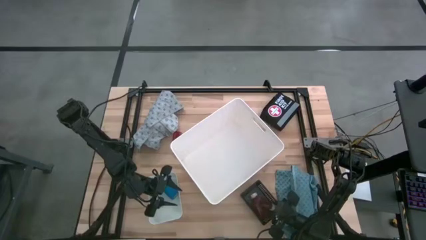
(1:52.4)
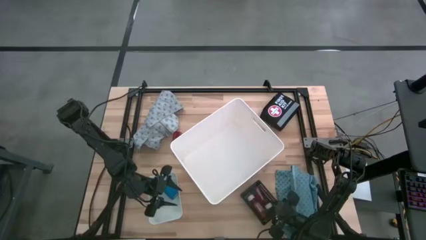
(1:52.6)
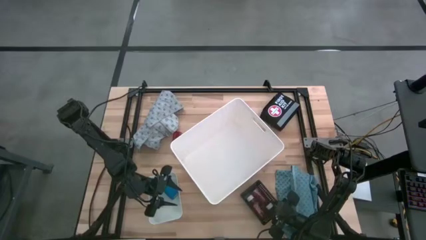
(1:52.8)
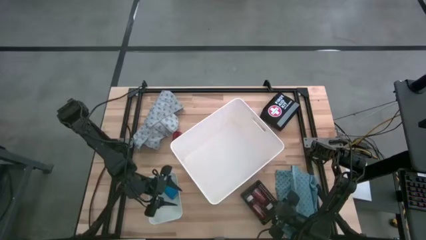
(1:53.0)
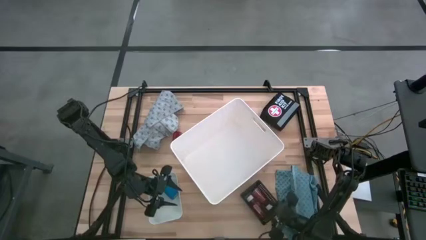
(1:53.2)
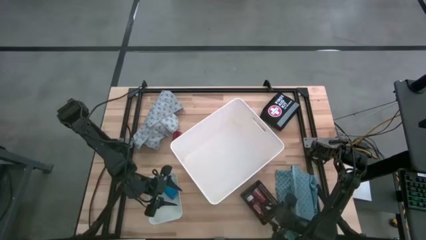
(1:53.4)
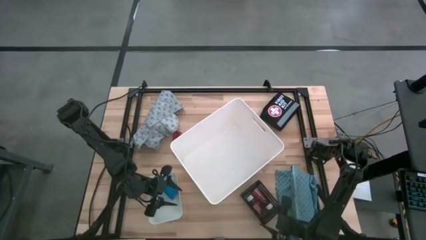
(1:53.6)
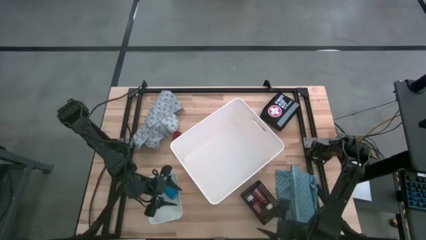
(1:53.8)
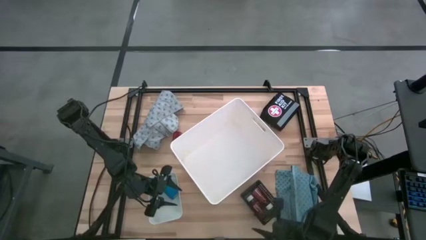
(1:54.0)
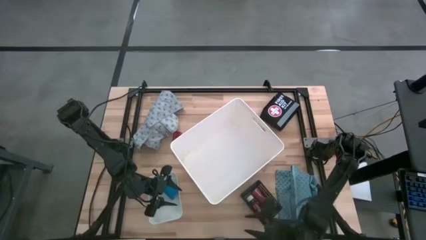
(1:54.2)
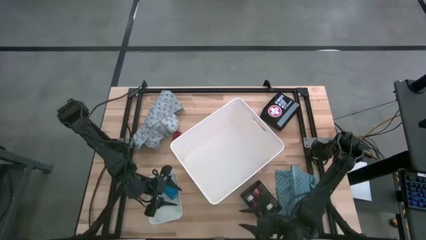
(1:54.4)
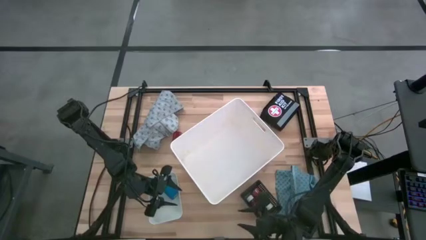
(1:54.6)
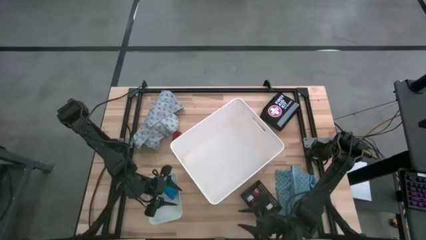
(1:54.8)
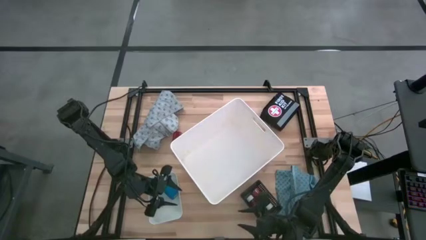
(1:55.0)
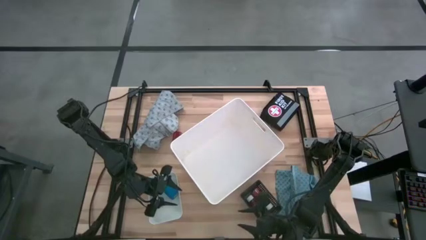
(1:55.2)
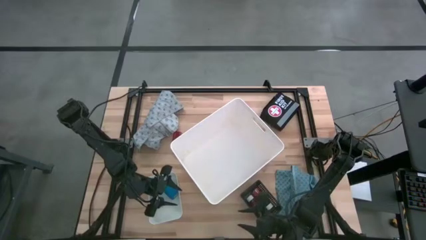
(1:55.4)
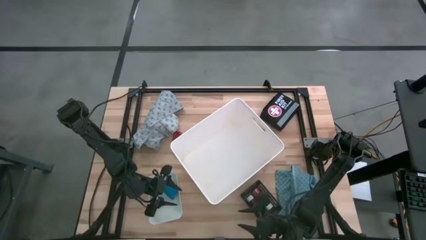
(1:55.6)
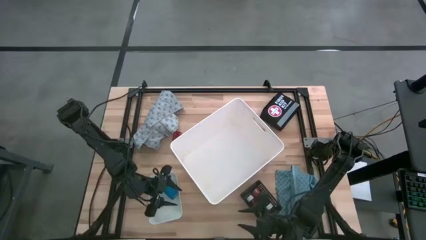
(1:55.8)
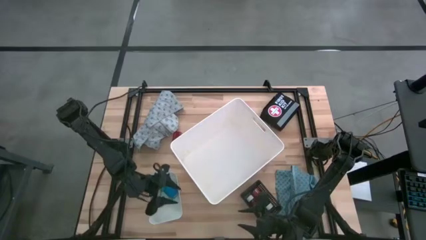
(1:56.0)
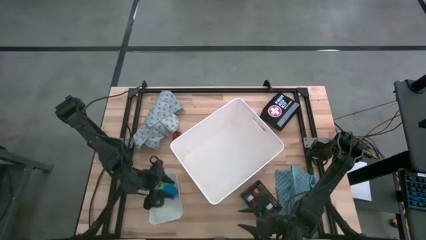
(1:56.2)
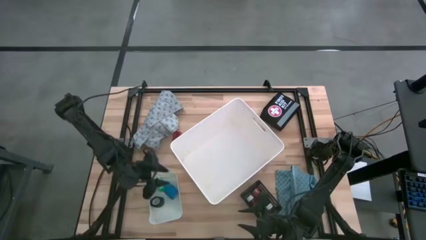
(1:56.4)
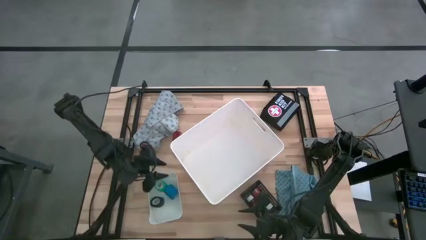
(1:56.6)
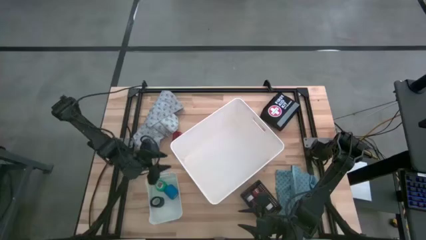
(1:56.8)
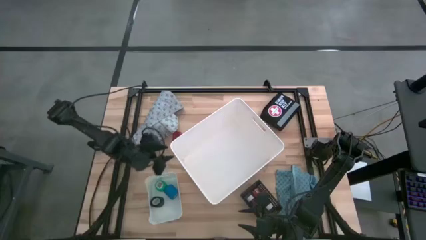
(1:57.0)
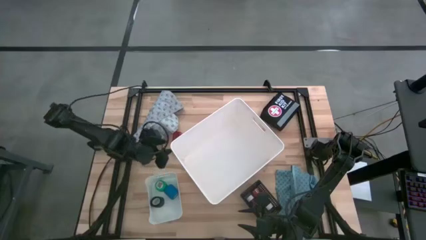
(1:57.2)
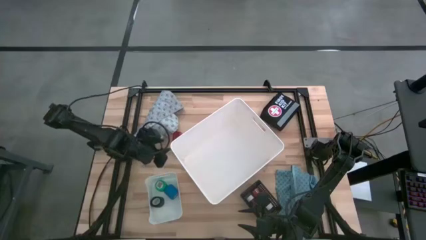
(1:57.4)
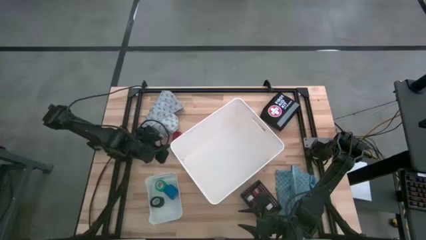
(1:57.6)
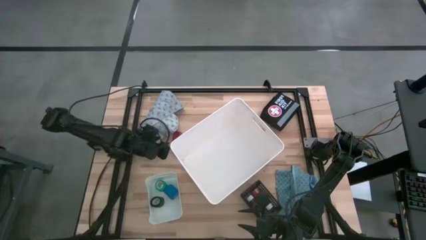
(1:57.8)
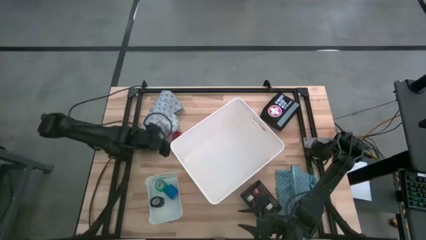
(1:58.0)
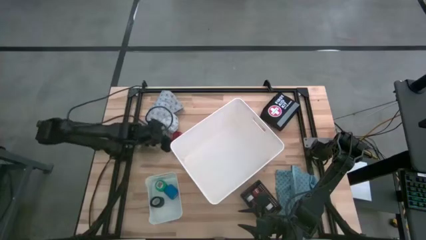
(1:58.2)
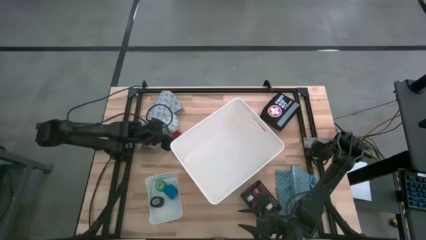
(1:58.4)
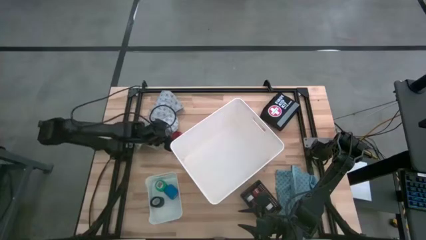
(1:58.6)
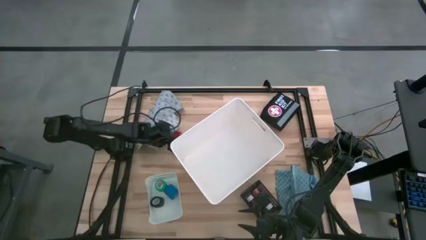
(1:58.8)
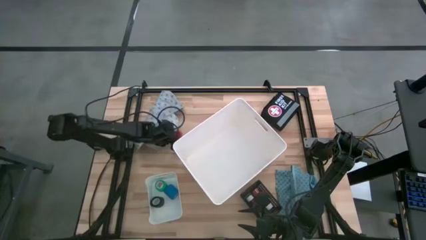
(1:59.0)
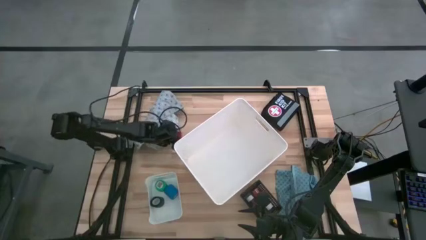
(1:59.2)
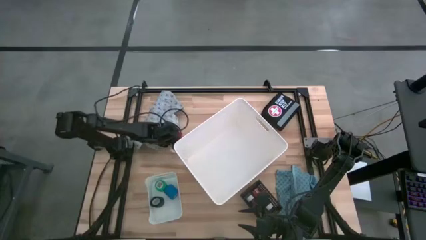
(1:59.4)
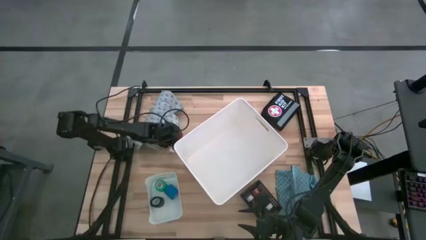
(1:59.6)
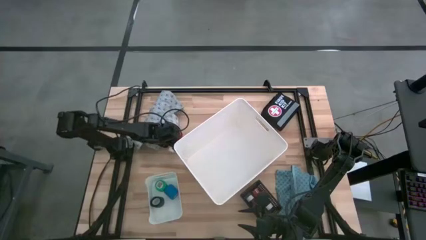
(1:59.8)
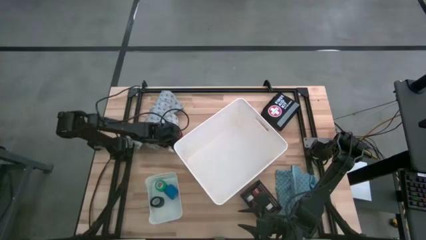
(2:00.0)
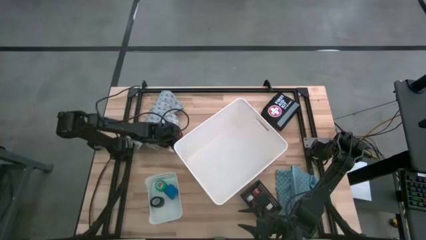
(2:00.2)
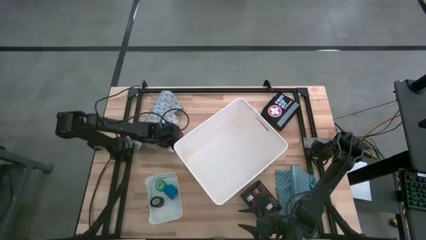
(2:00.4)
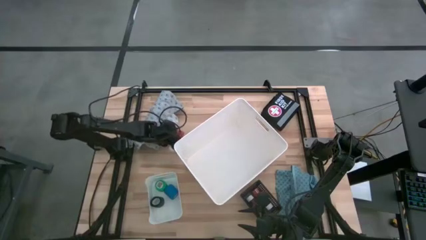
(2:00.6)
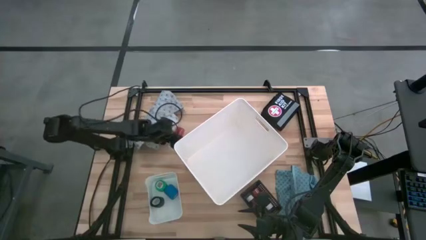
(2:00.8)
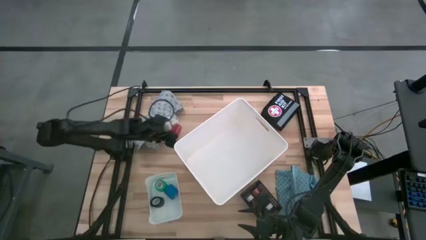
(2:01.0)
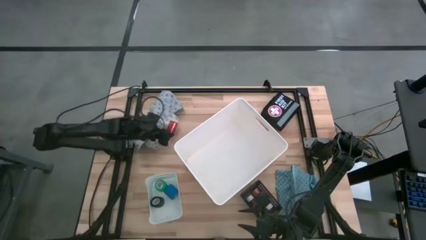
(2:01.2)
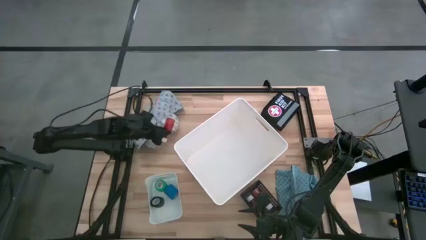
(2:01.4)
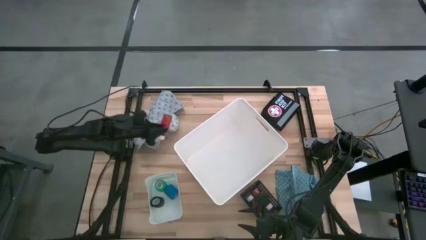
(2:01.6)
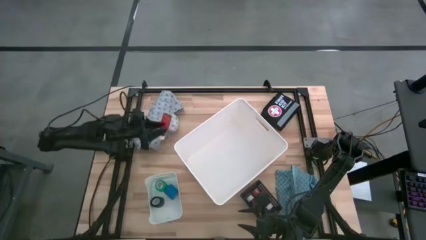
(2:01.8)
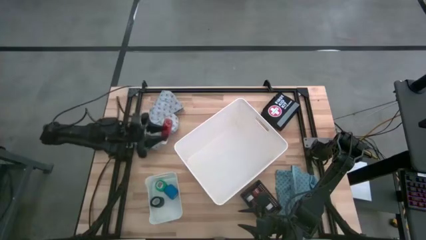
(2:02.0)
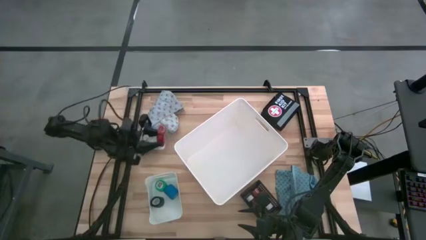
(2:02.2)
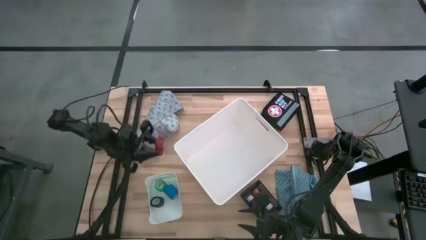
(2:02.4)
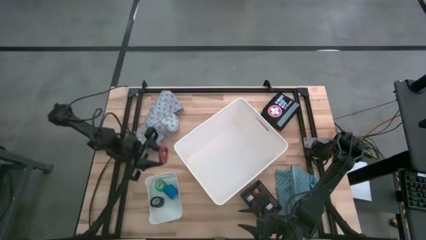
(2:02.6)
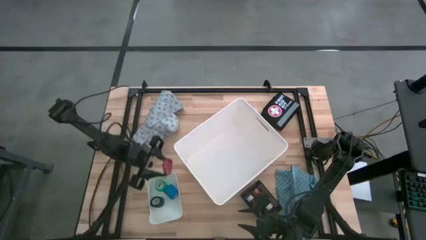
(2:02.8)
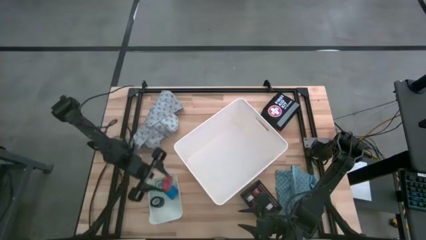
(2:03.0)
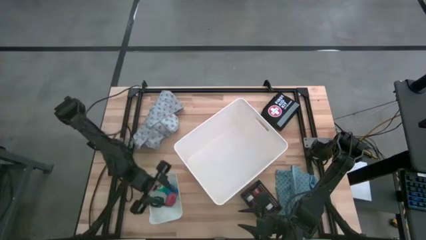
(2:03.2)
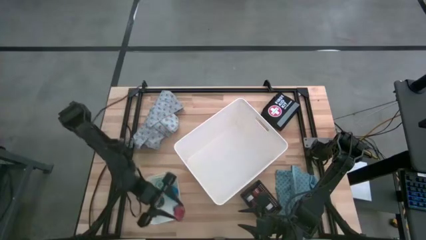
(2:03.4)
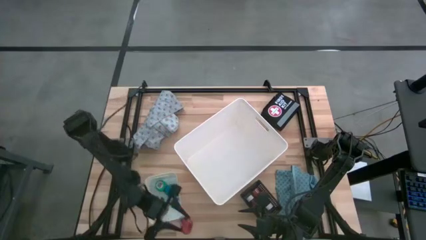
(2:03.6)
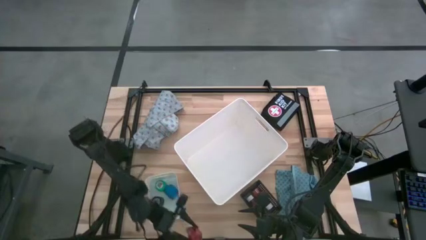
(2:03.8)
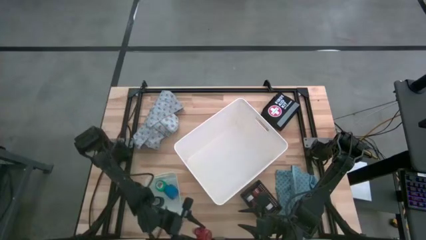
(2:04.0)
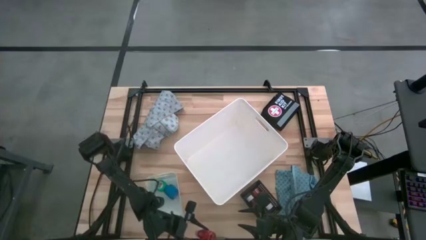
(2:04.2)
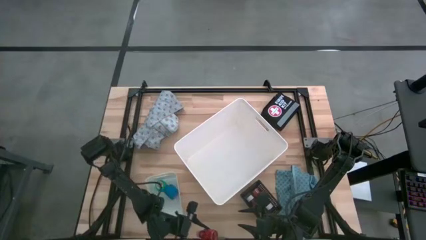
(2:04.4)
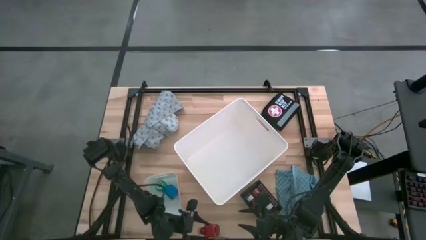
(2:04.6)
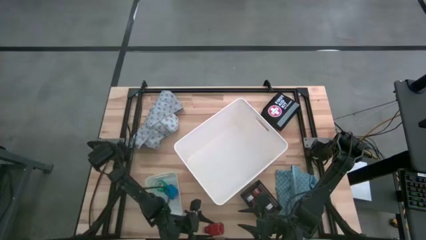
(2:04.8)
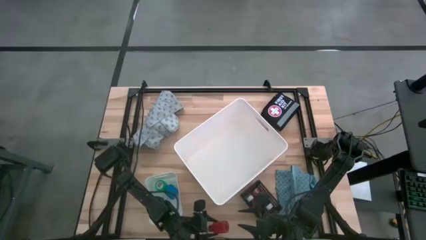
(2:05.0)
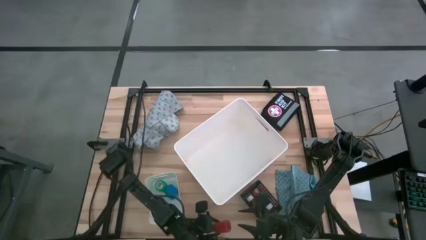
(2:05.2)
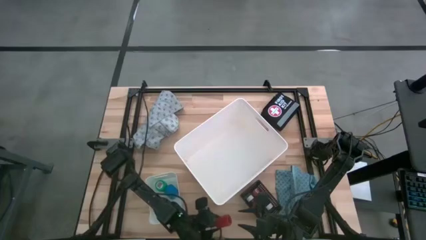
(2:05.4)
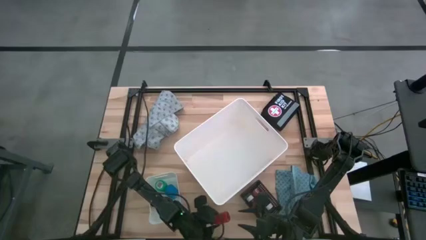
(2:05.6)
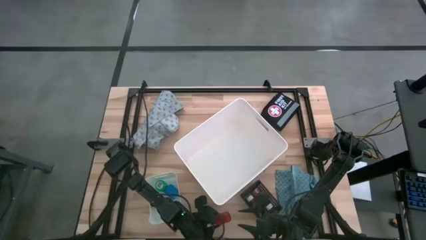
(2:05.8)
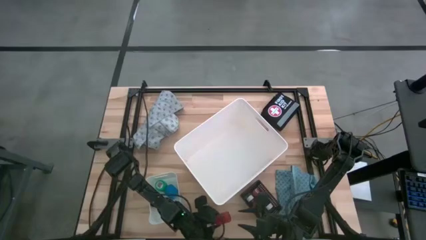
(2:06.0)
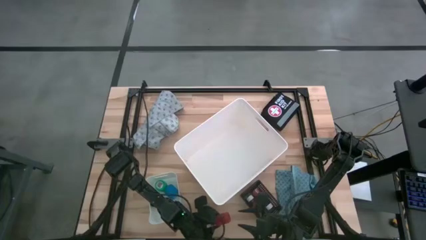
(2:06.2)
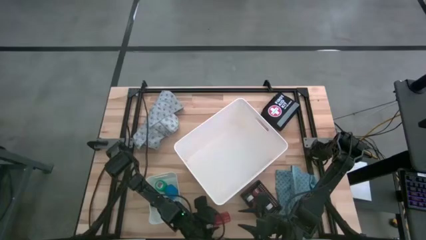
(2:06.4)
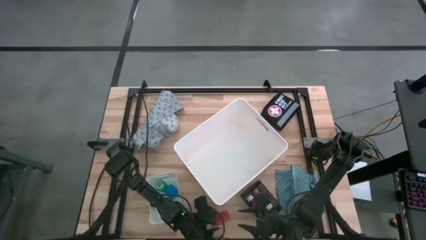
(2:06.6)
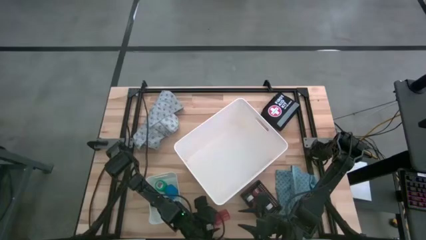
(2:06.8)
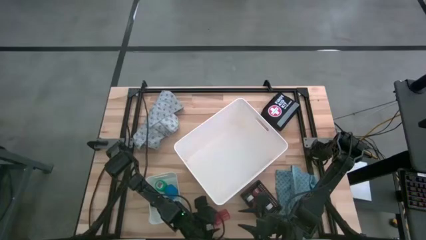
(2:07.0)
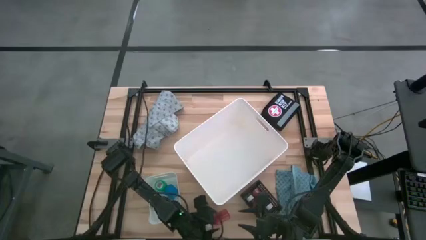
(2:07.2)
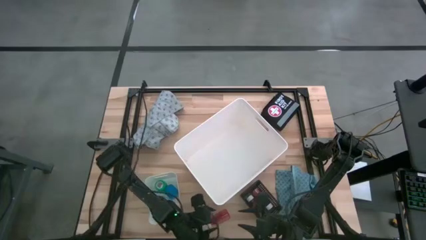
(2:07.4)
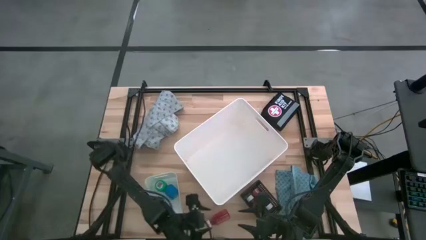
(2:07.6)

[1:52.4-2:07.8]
Task: Pick & place medical supplies in basket/bin
Put the orange bottle into the black basket

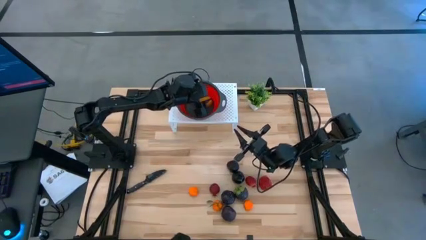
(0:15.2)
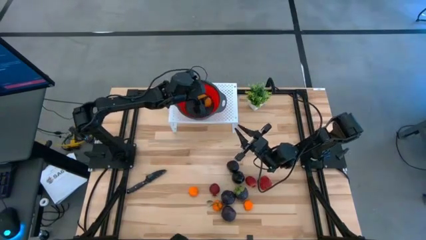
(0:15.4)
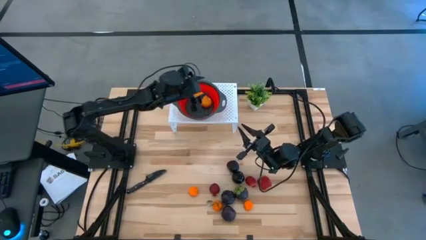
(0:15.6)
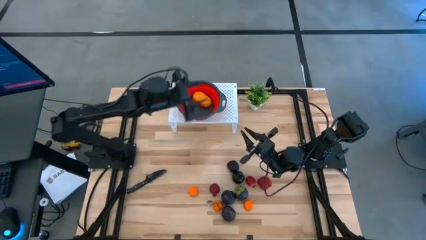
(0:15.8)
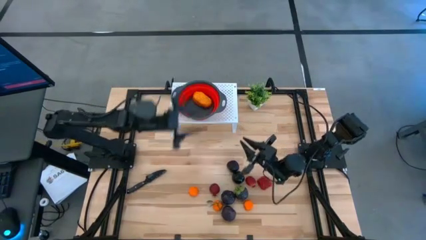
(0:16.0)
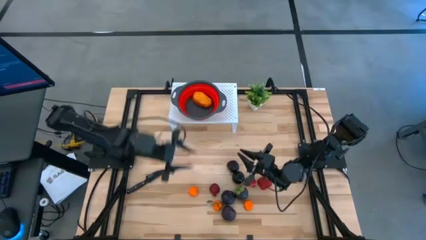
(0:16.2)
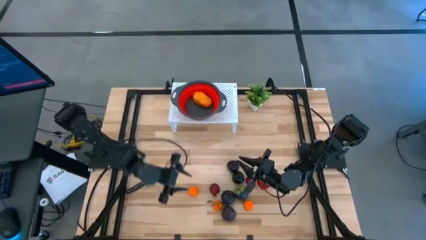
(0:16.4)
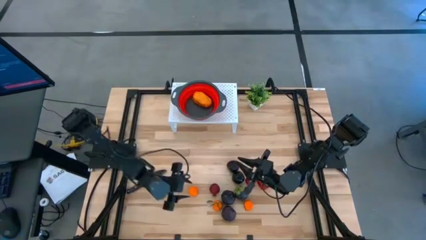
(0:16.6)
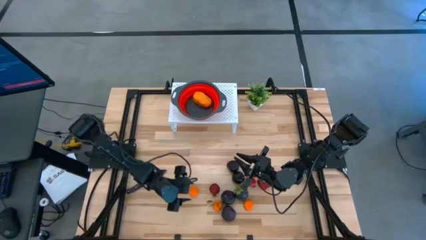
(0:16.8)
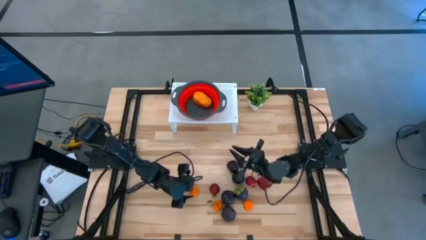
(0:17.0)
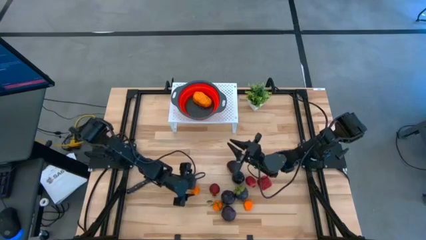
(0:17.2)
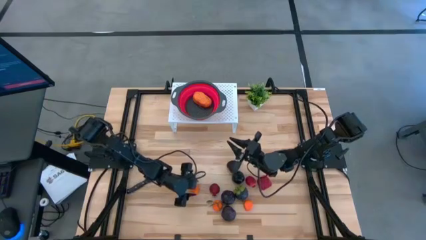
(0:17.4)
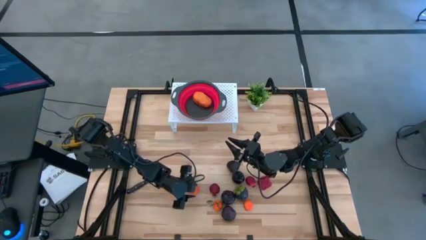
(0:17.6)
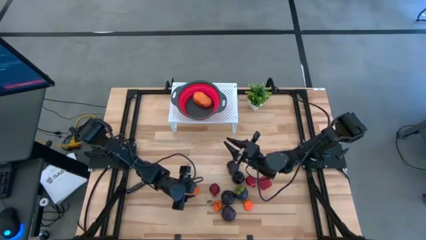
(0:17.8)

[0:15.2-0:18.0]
Task: Pick & Place Fruit
Put the orange into the red strainer bowl on the shelf
